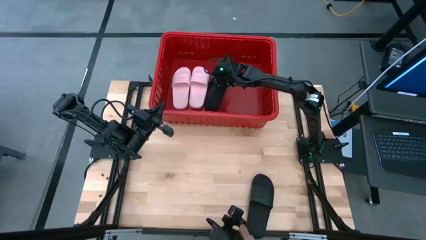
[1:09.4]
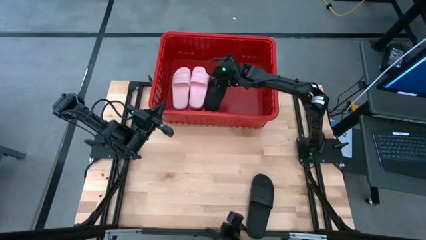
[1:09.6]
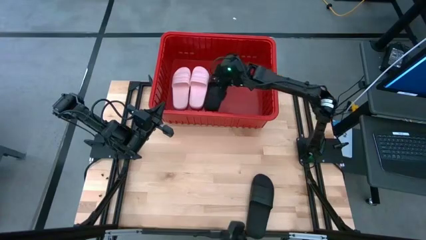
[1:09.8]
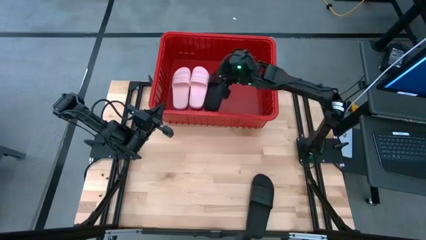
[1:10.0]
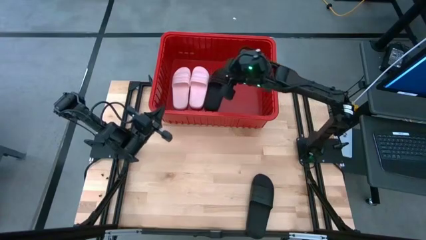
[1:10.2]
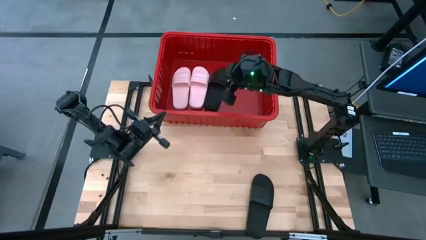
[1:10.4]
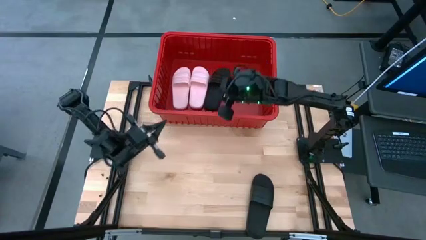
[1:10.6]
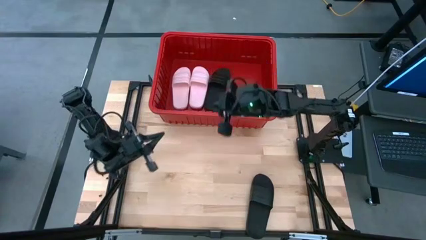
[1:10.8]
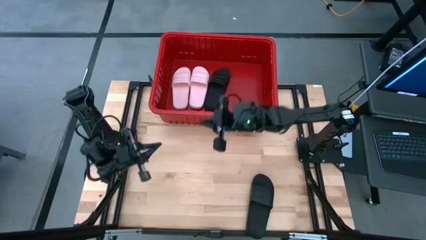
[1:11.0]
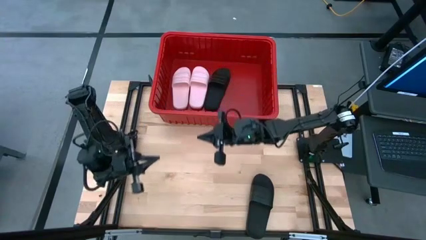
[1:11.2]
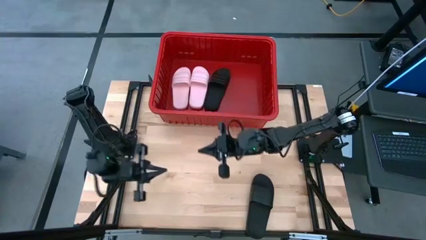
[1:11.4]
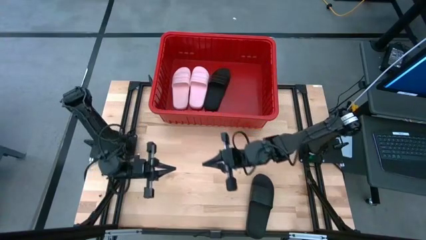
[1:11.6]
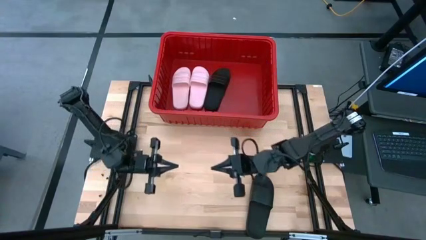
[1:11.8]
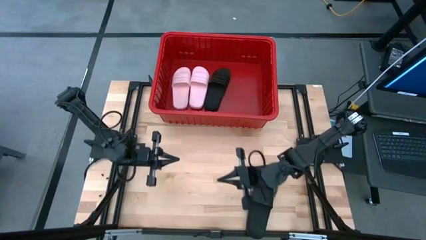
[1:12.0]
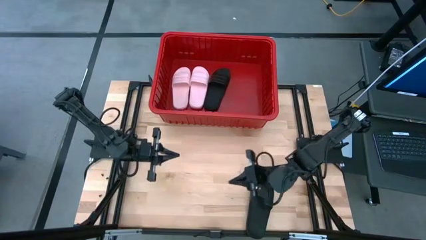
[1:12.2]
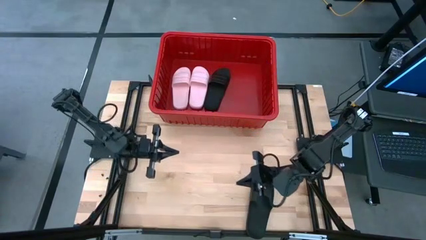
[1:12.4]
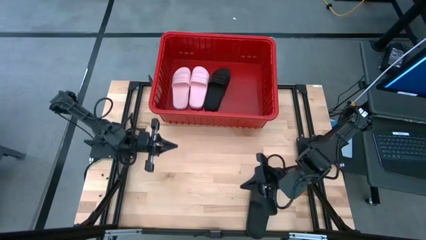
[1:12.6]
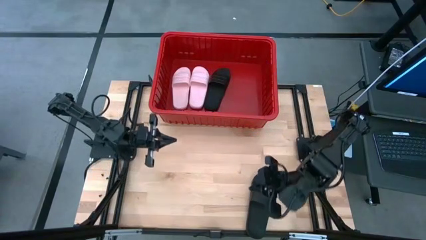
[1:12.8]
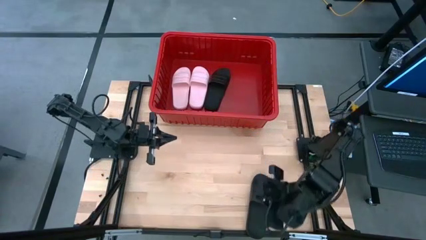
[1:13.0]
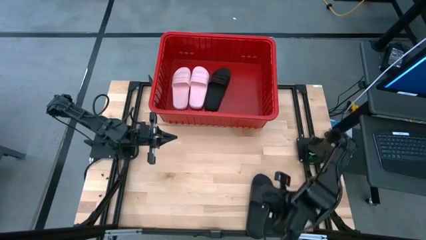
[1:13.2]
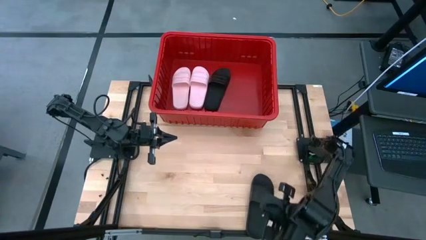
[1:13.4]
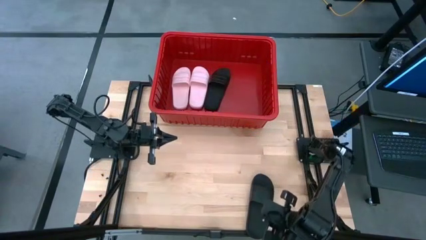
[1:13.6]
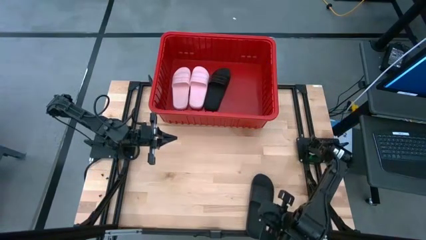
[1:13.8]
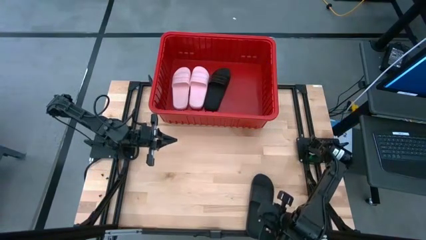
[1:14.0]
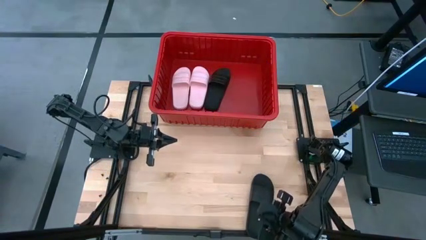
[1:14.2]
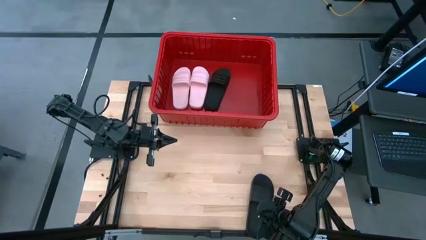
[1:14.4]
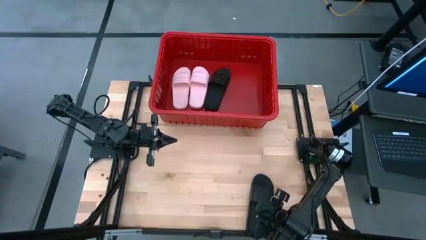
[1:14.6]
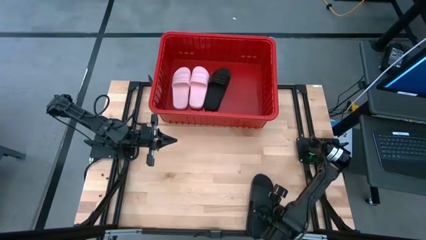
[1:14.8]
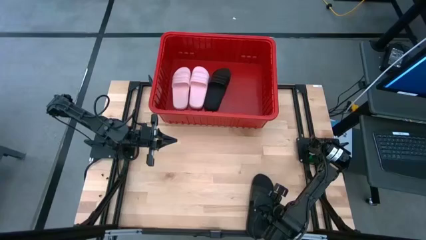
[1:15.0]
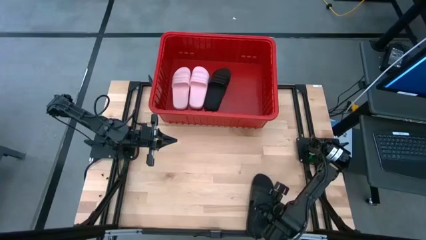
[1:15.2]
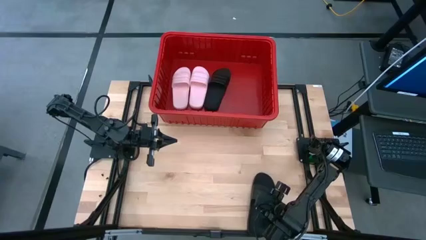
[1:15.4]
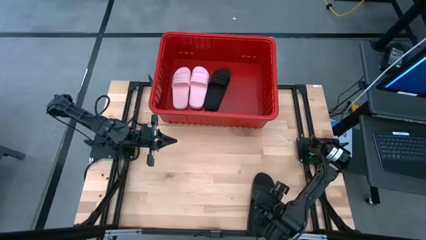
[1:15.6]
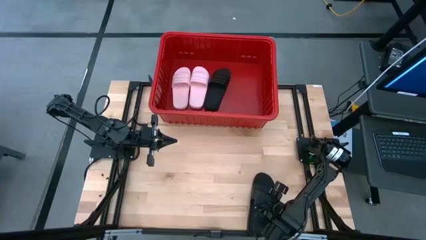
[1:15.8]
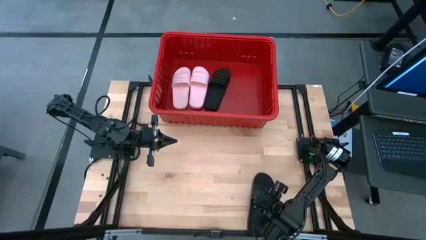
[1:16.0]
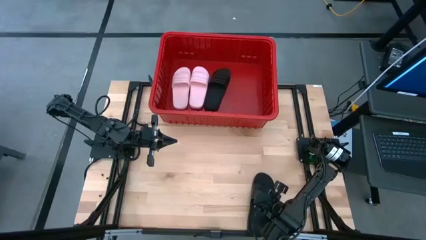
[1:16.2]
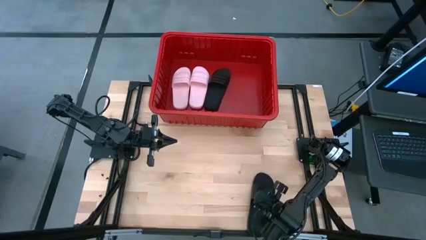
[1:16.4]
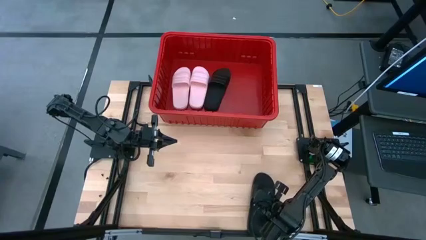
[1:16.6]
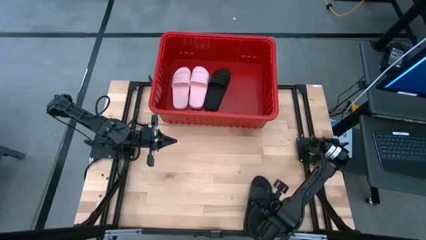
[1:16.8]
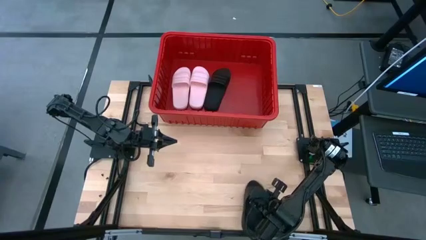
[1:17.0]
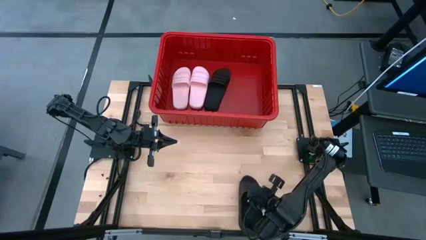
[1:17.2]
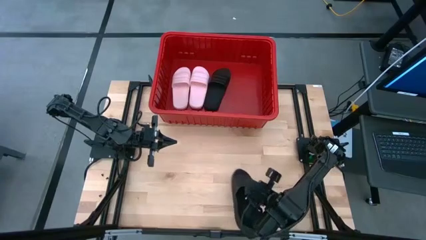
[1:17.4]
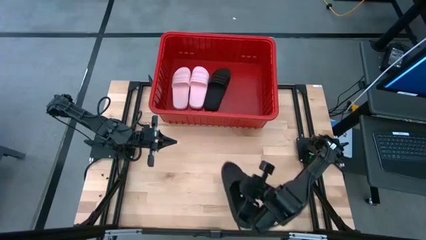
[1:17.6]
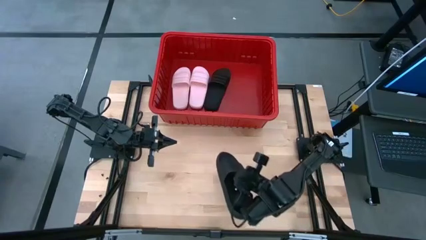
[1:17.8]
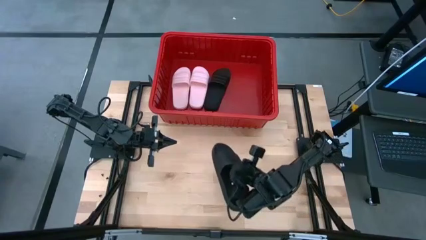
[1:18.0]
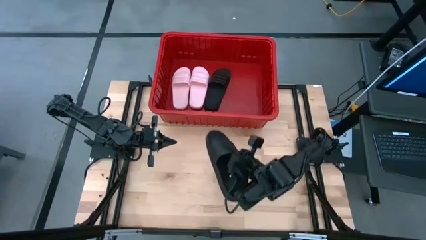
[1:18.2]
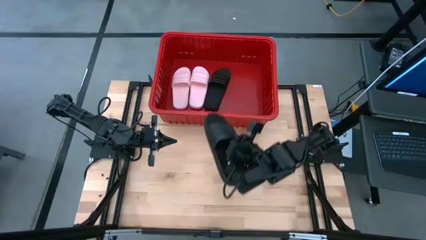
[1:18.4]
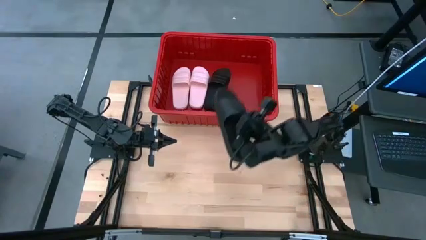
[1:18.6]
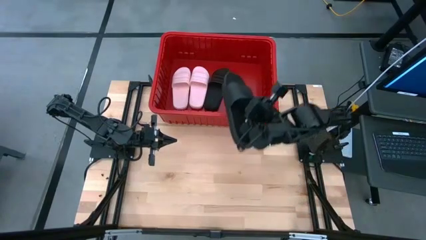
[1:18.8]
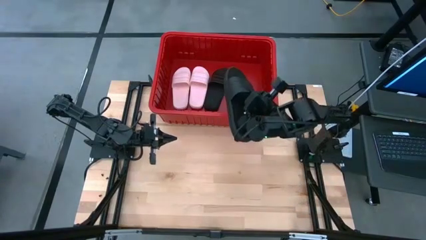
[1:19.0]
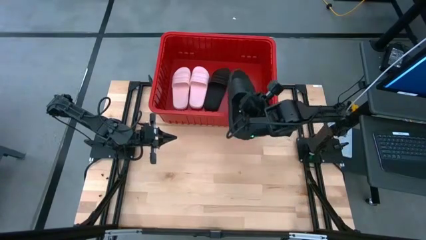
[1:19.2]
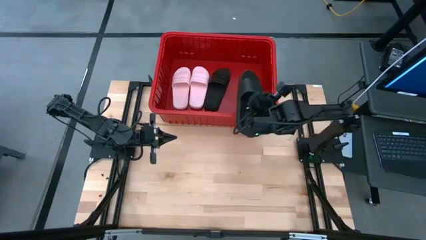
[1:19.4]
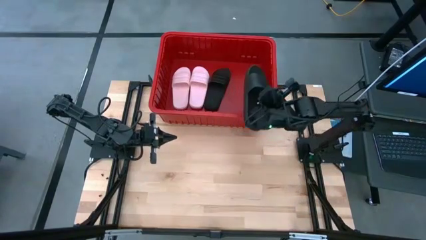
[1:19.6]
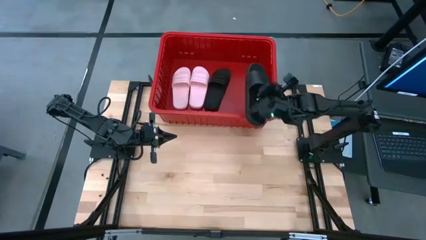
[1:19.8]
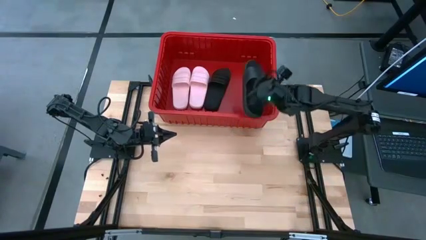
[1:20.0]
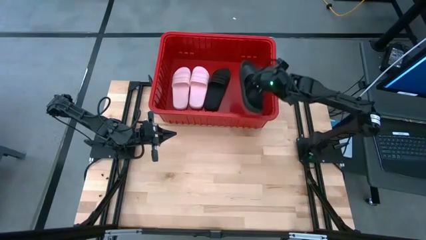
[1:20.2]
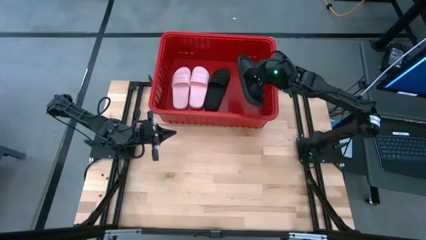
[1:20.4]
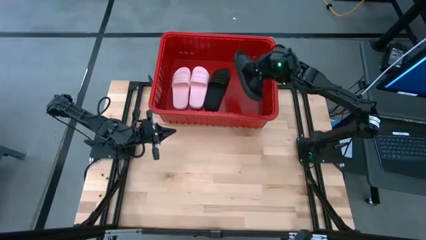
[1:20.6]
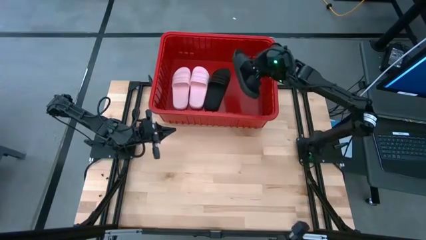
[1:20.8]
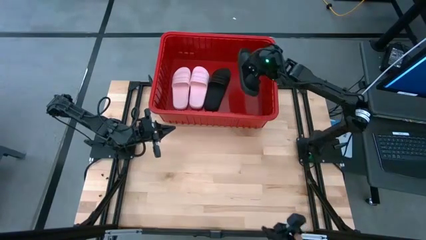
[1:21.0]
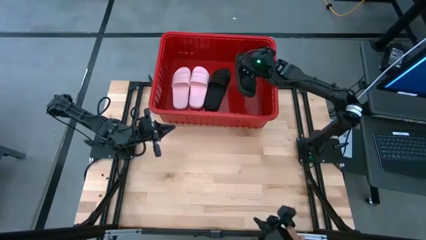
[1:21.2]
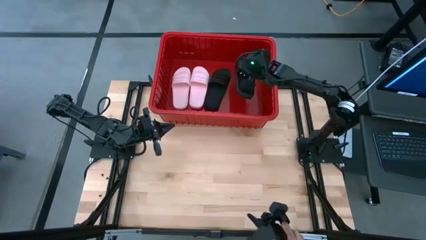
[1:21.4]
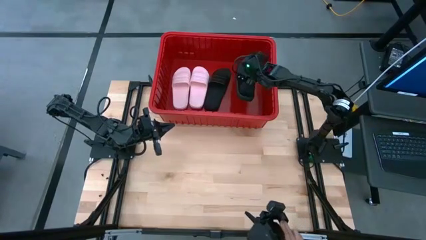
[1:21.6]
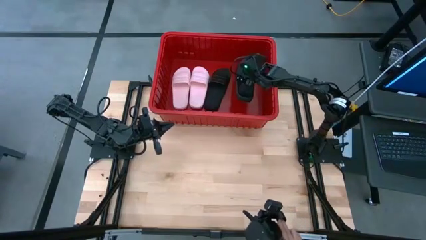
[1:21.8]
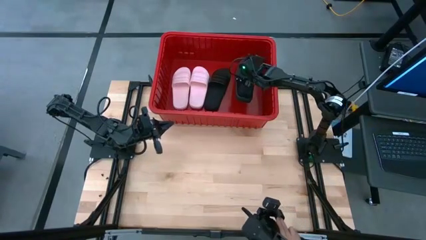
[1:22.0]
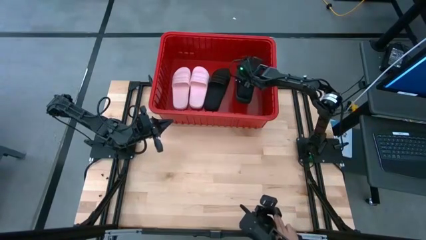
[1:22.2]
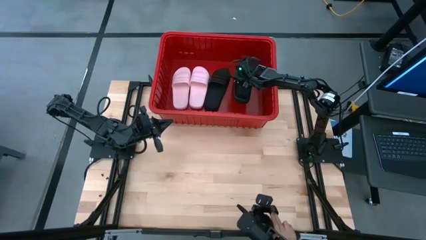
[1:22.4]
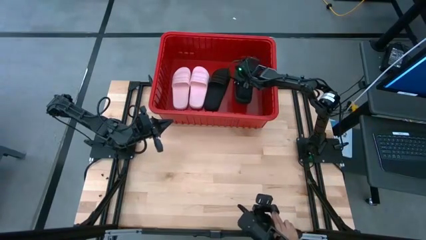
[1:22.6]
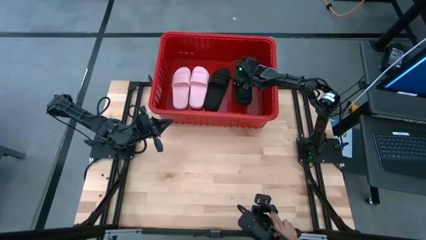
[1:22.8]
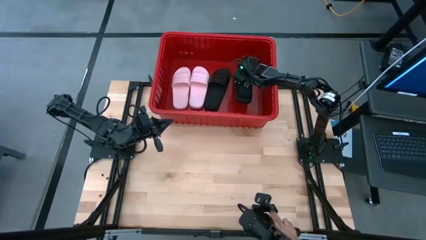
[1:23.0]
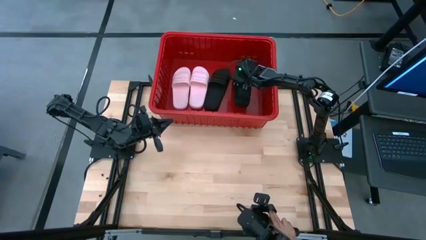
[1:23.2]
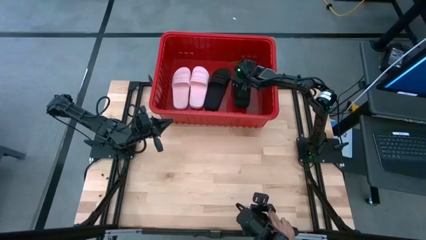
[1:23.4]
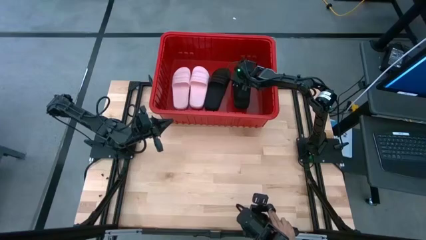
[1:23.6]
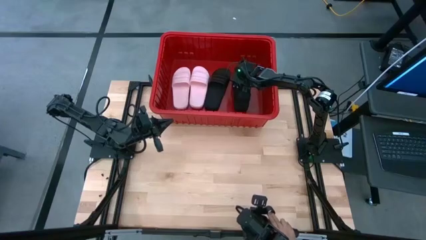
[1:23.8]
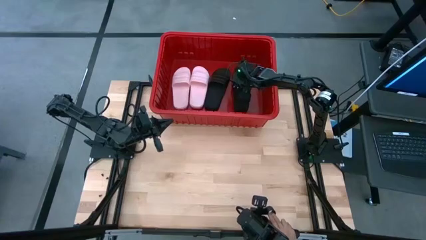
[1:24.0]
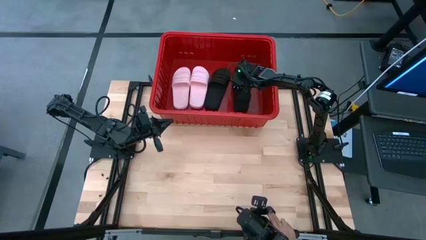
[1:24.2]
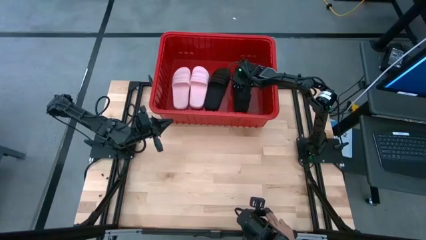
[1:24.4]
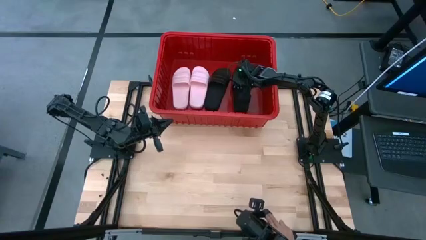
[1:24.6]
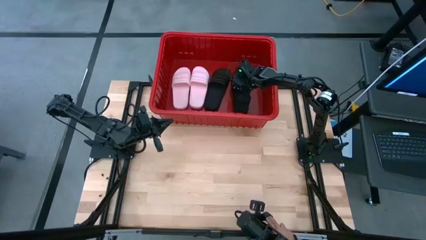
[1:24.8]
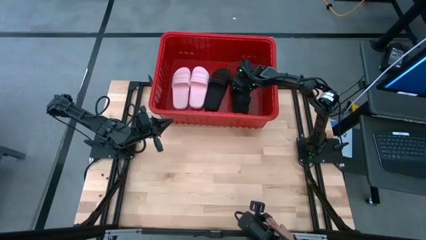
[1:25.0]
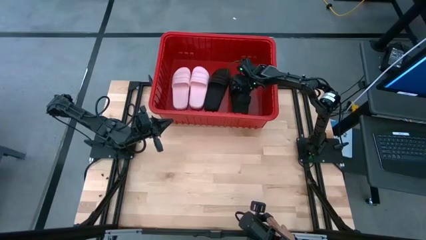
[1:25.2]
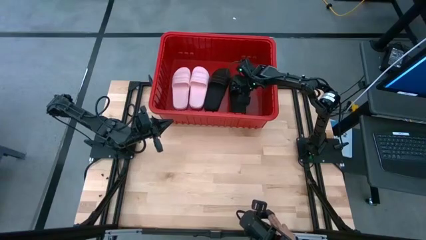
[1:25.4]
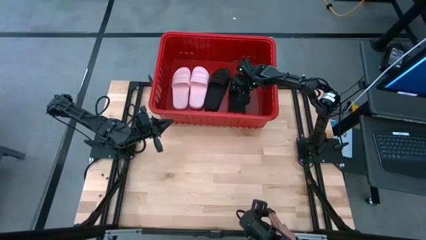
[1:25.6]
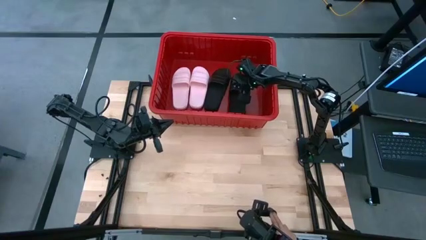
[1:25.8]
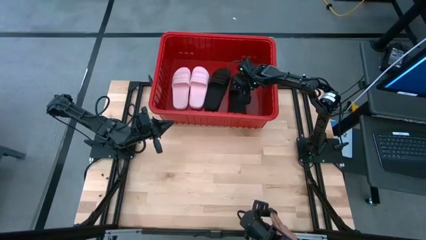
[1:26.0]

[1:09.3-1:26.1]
Task: Pick and place slides into bin
Put the black slipper into the red bin
